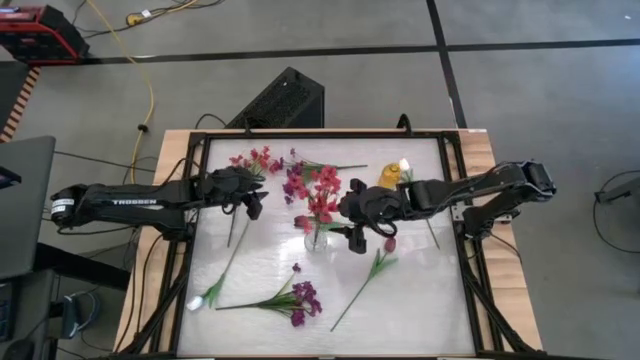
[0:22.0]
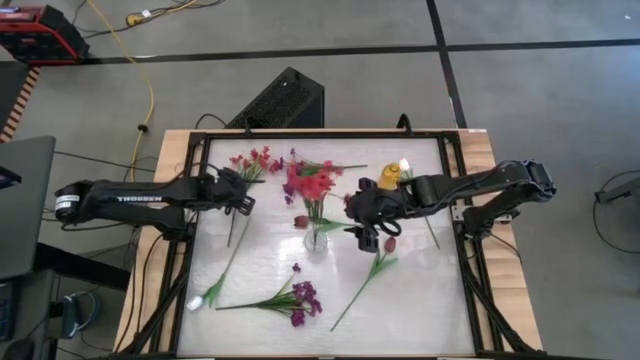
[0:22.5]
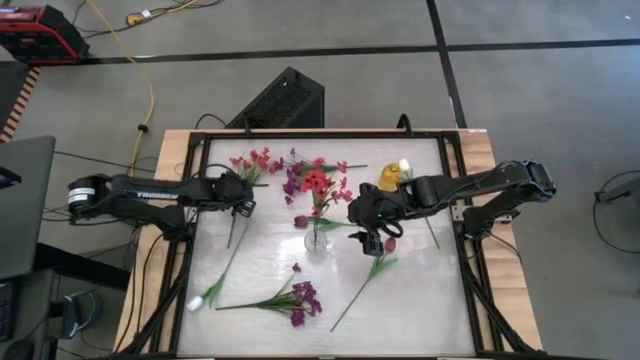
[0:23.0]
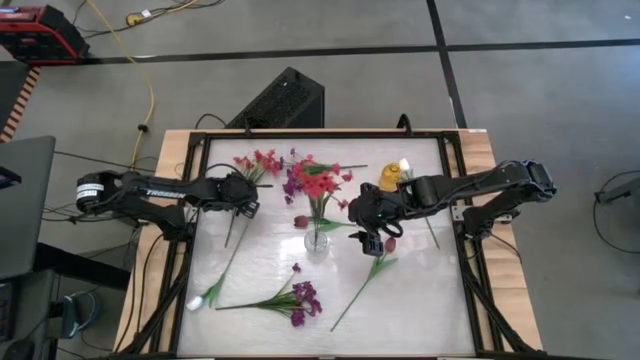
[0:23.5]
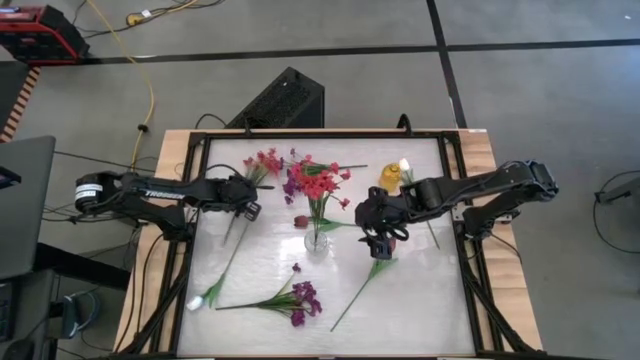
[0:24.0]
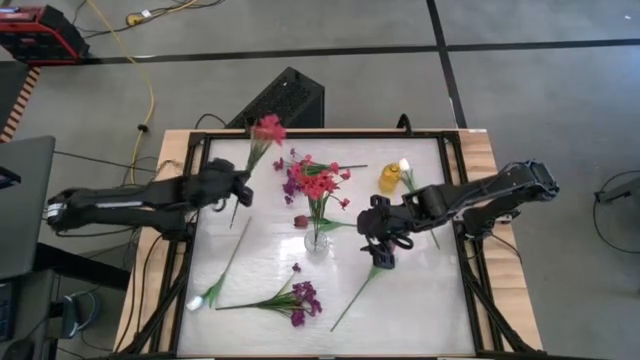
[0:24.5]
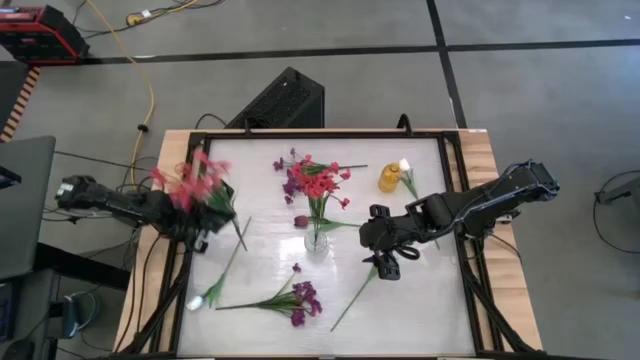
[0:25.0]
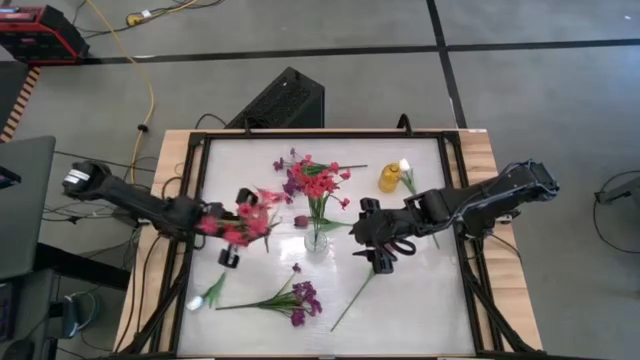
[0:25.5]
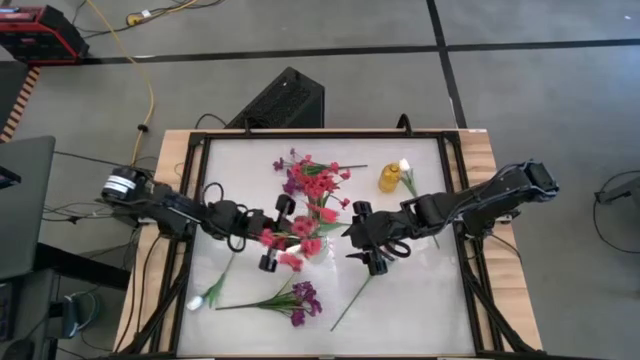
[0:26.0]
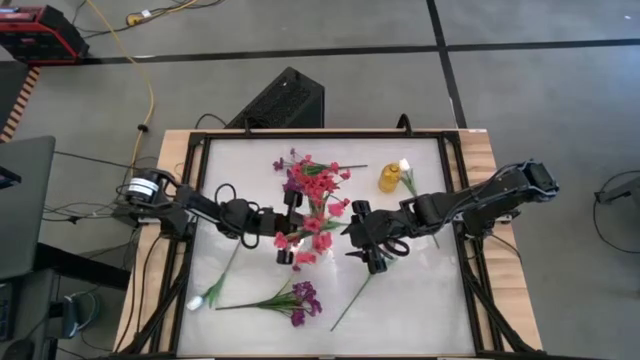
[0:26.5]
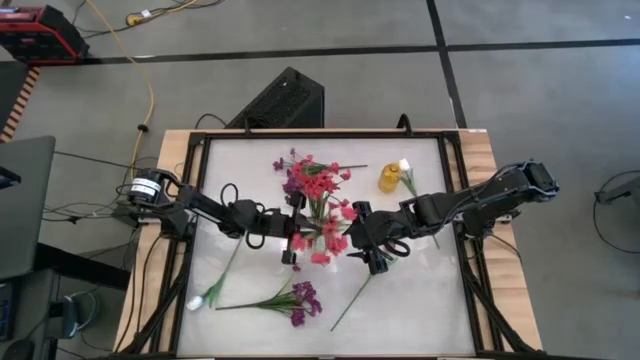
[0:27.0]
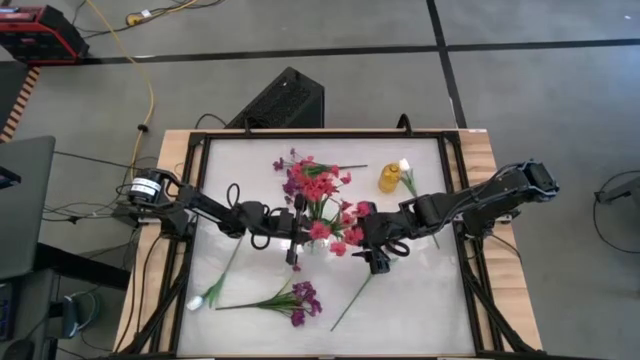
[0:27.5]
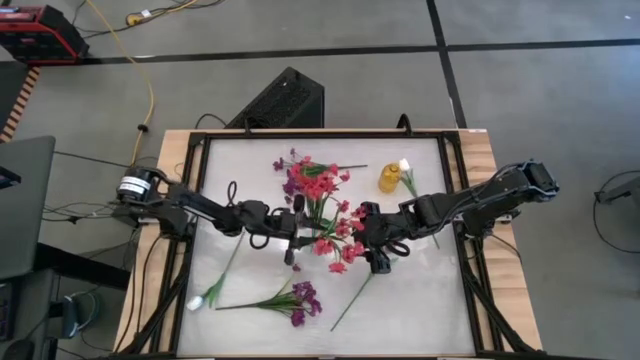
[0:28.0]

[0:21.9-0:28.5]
Task: Sort flowers into vase by color
Put the pink flowers into the yellow vase

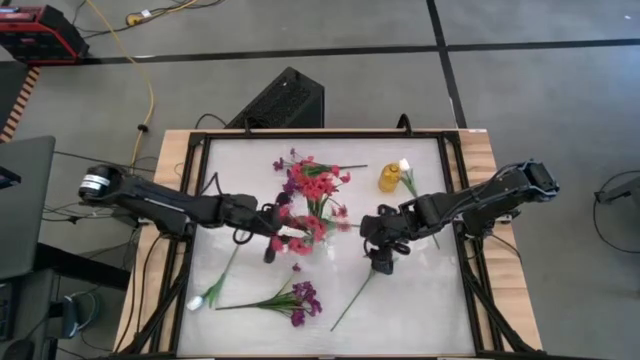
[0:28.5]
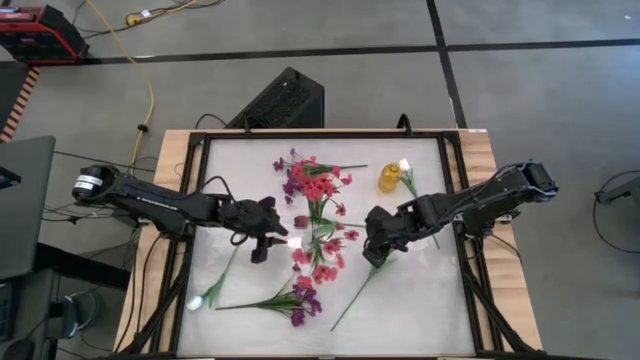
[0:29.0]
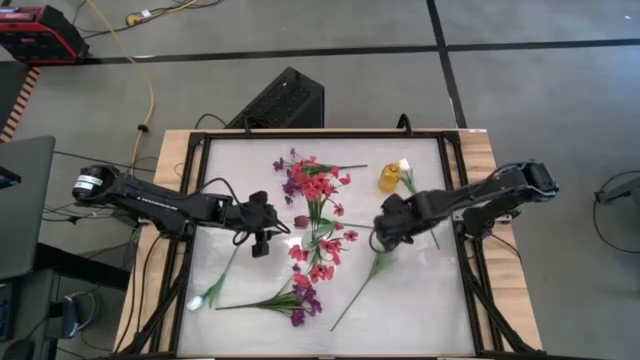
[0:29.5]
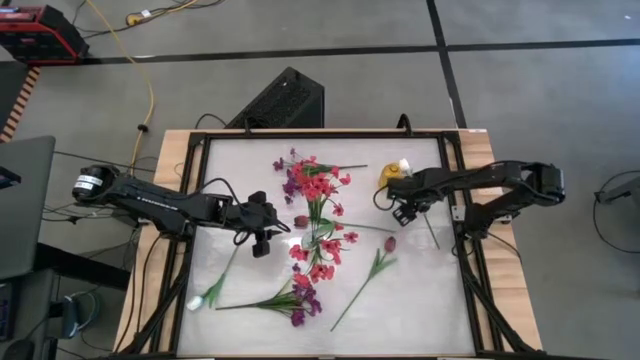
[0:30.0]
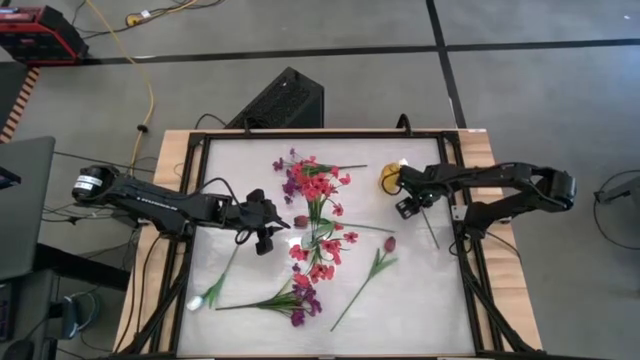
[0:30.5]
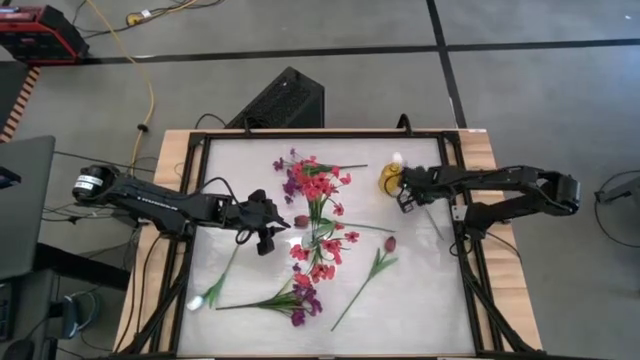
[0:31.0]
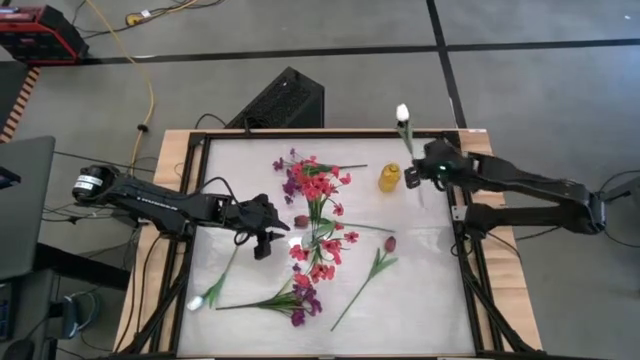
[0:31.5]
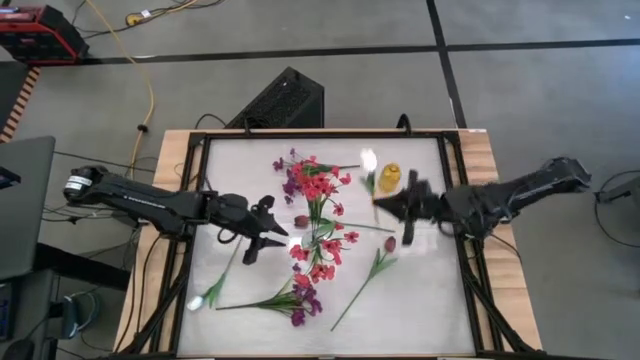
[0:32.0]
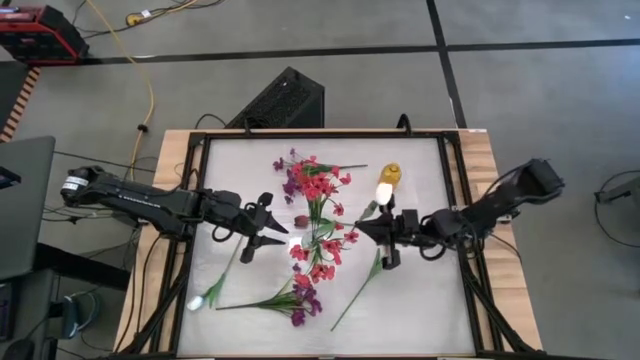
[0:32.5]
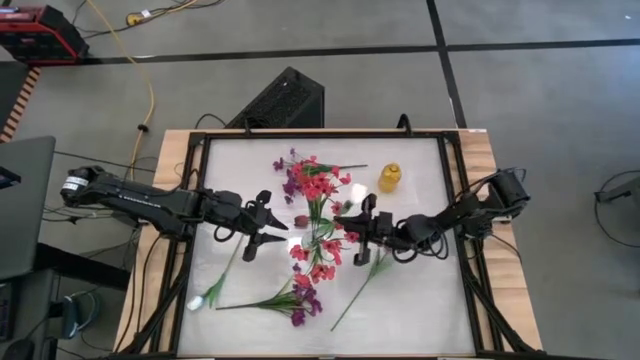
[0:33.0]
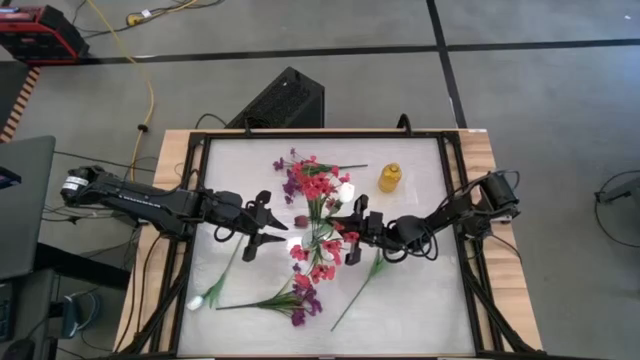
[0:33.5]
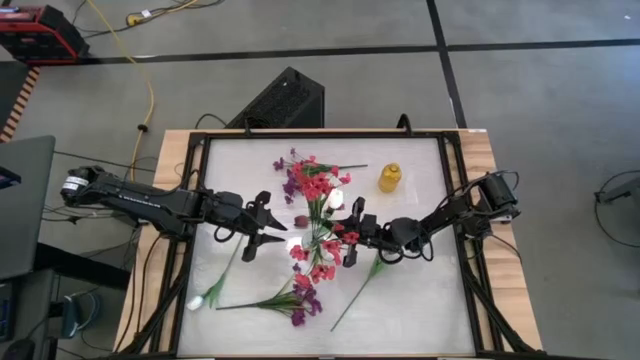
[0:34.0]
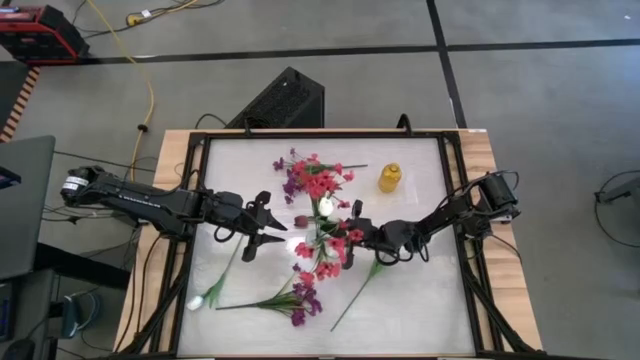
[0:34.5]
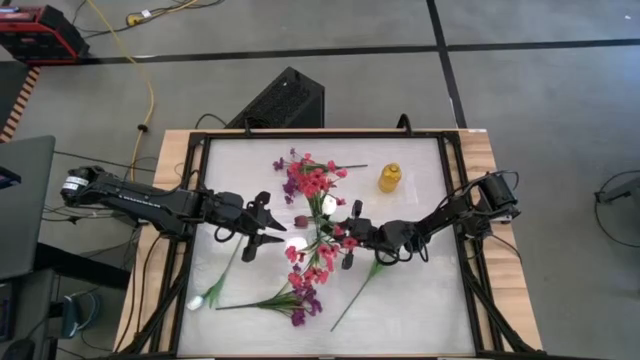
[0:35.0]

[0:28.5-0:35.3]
Put the top white tulip into the transparent vase

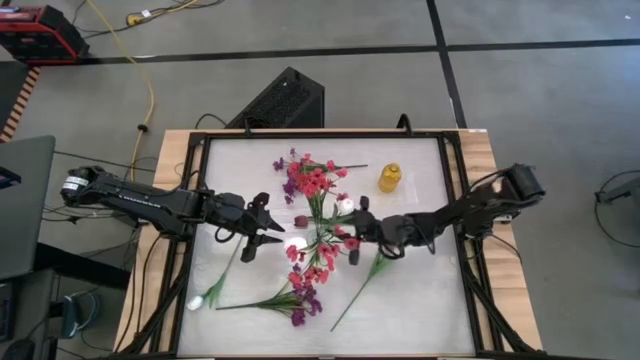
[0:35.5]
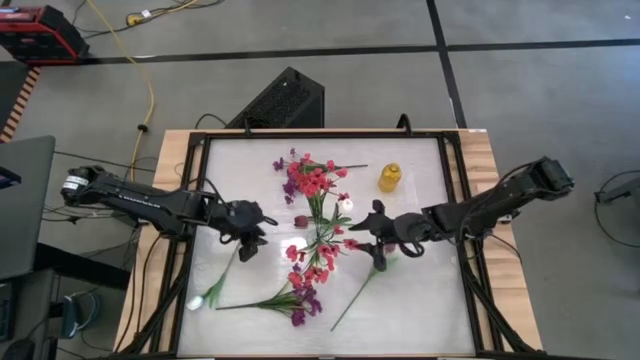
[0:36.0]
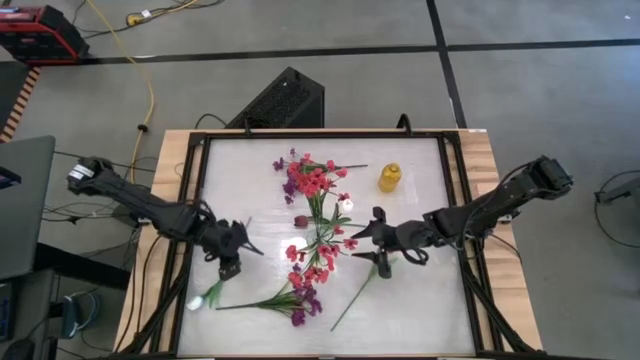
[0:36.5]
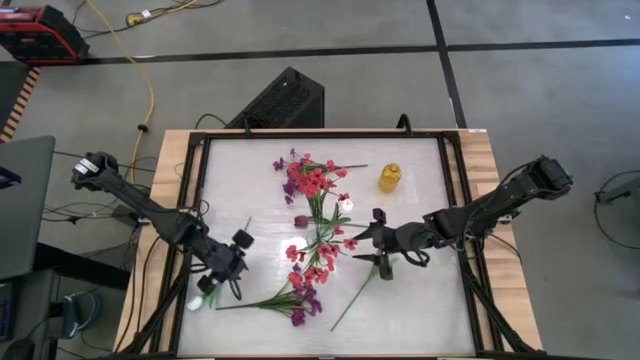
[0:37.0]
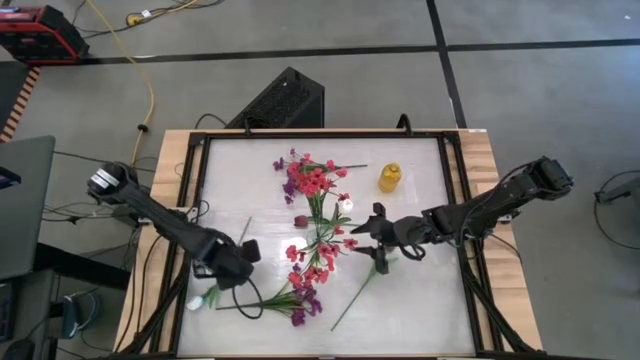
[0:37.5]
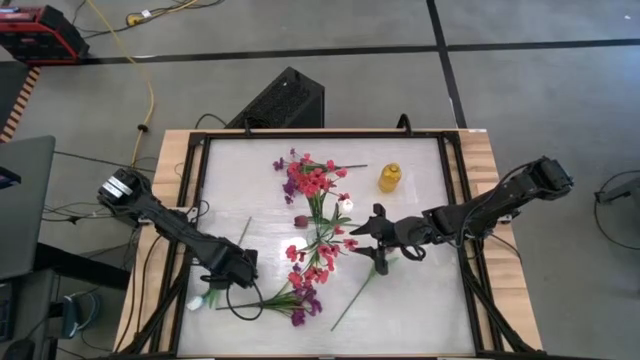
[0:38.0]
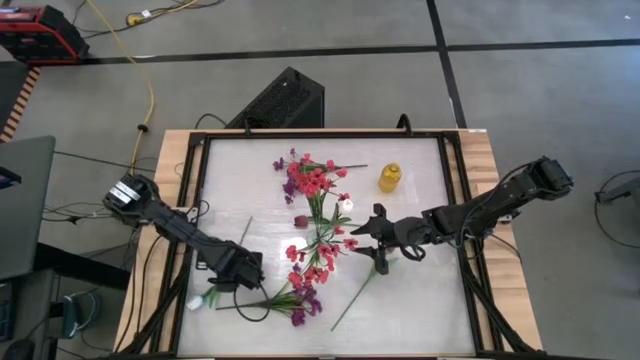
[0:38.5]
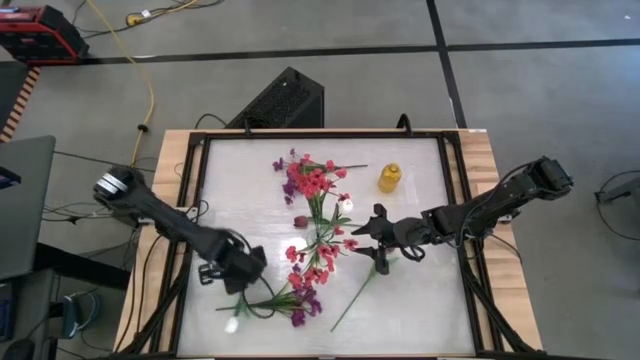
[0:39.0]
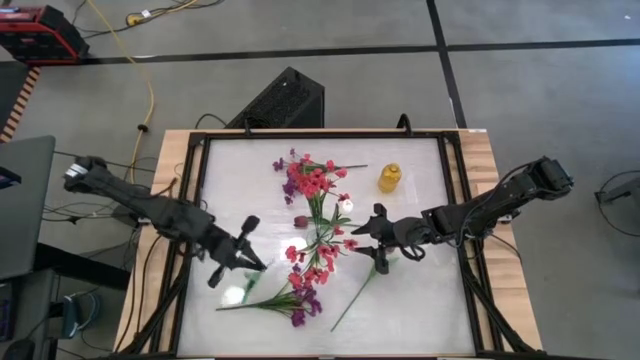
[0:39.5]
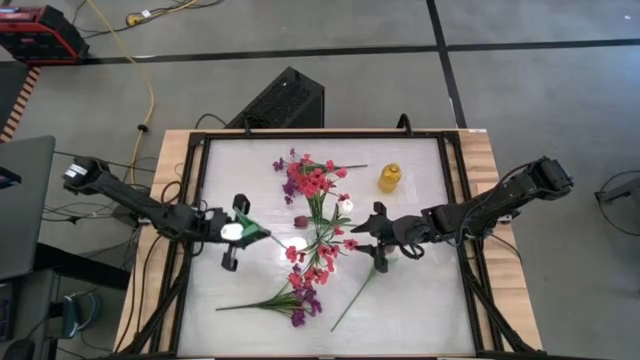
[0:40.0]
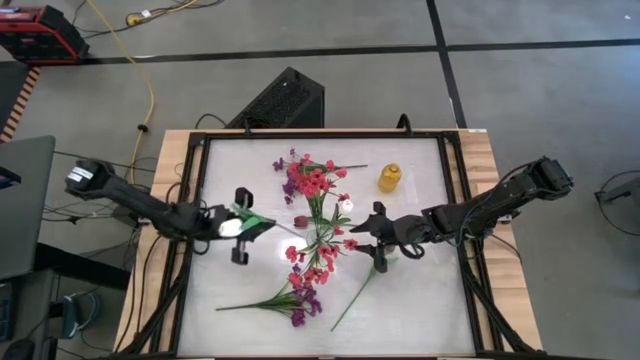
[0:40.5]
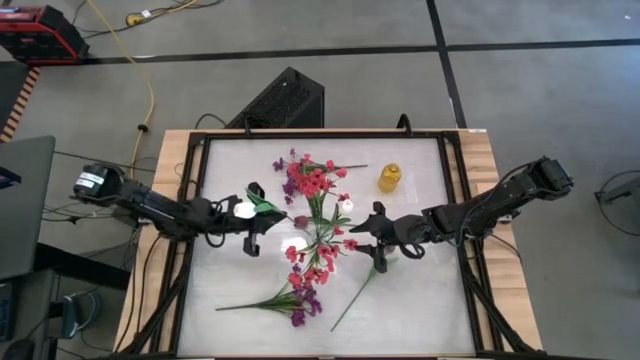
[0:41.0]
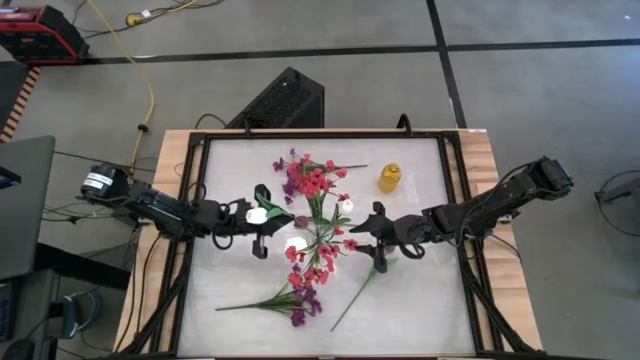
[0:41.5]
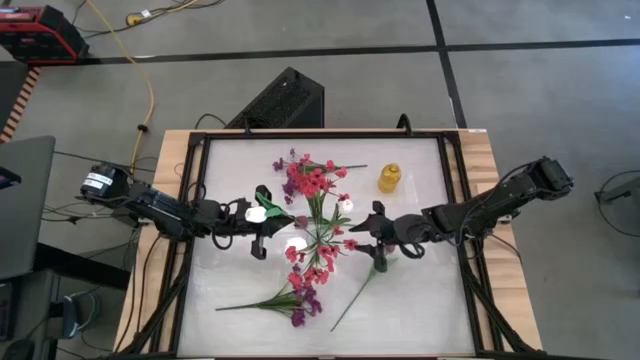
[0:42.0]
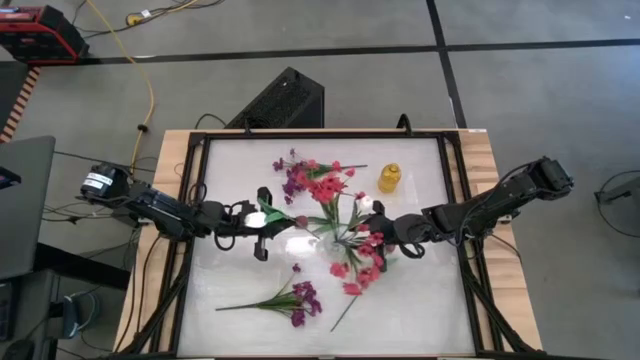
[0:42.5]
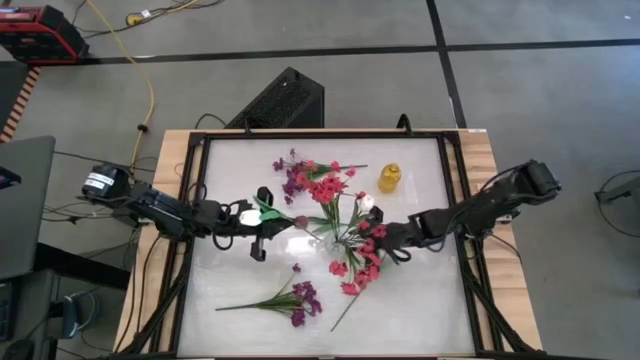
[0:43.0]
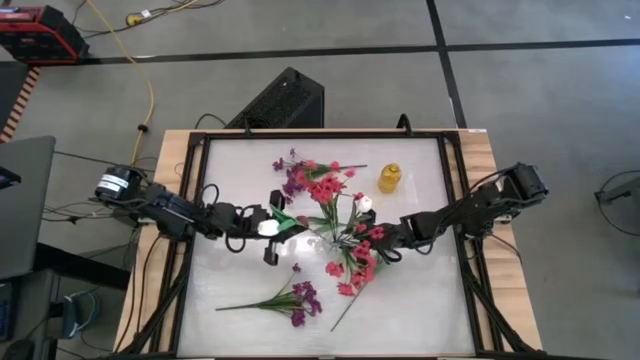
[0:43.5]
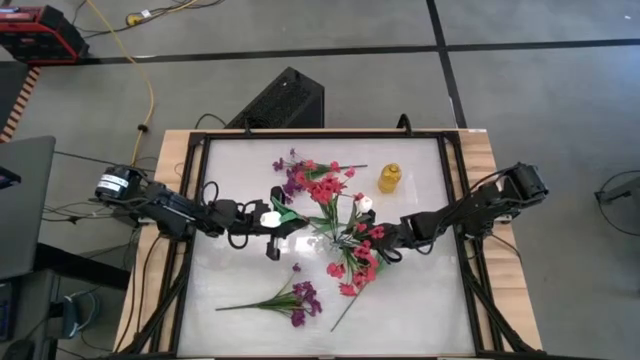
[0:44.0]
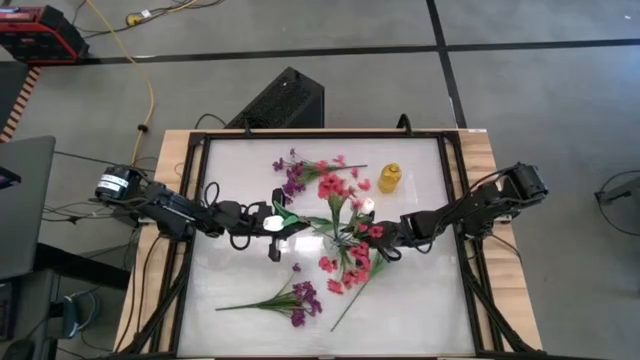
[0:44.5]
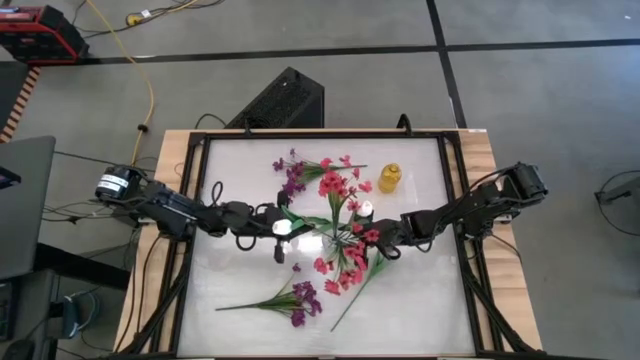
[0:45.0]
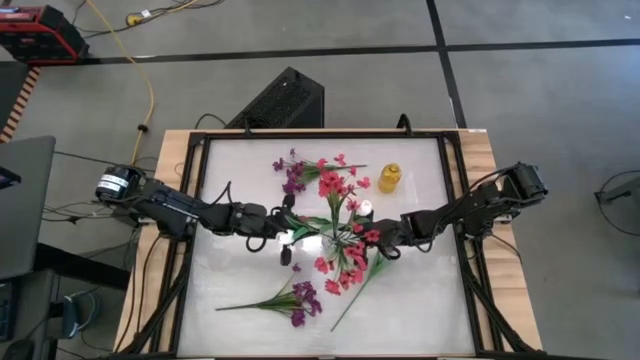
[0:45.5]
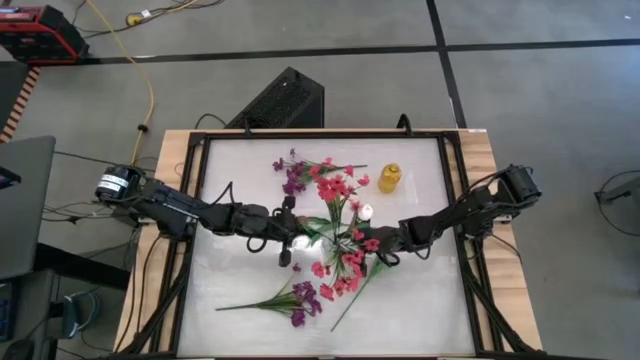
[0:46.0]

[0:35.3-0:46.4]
Put the white tulip into the transparent vase
